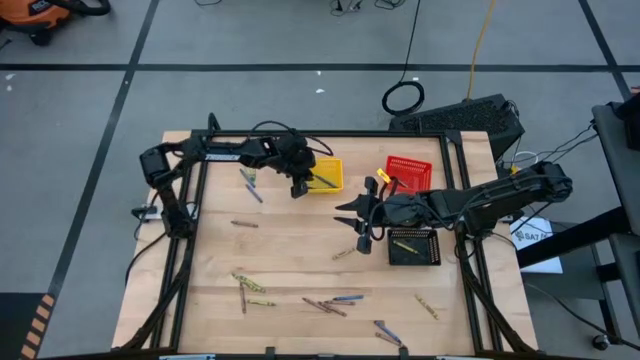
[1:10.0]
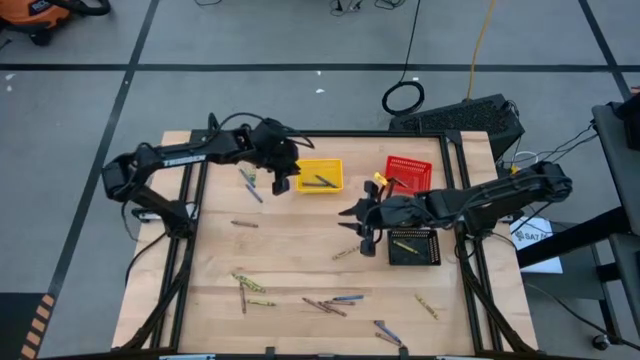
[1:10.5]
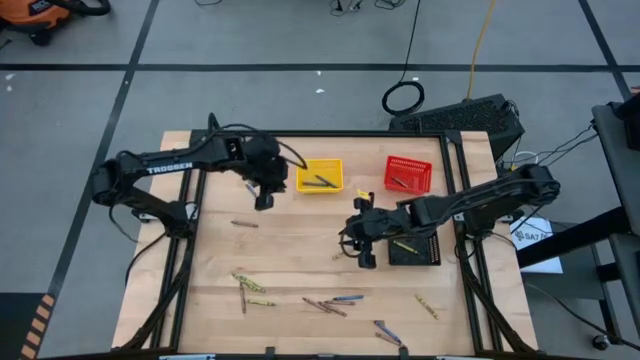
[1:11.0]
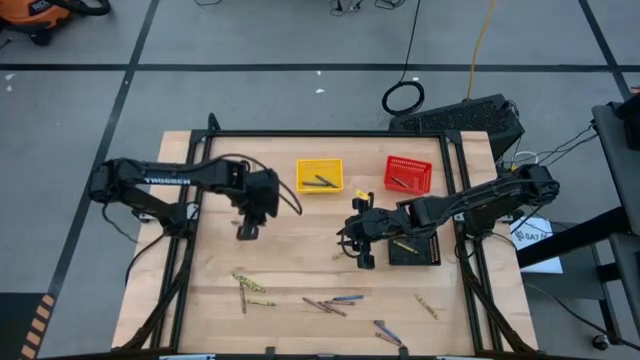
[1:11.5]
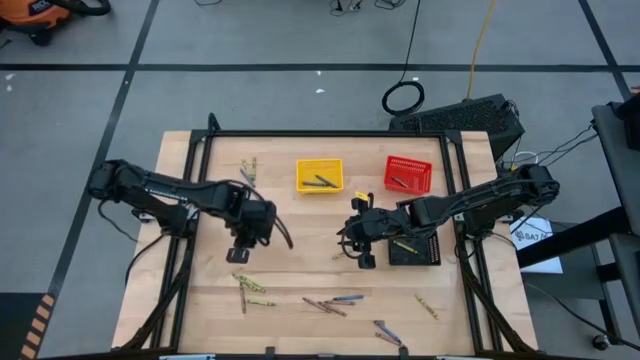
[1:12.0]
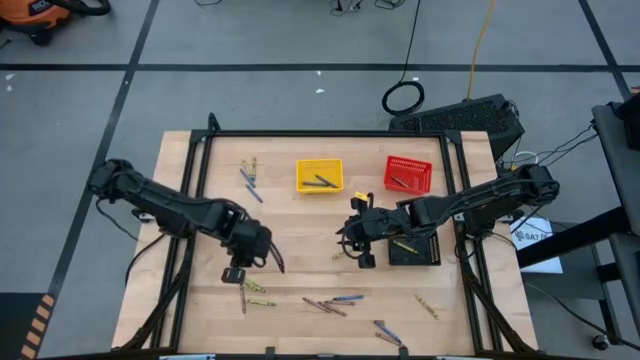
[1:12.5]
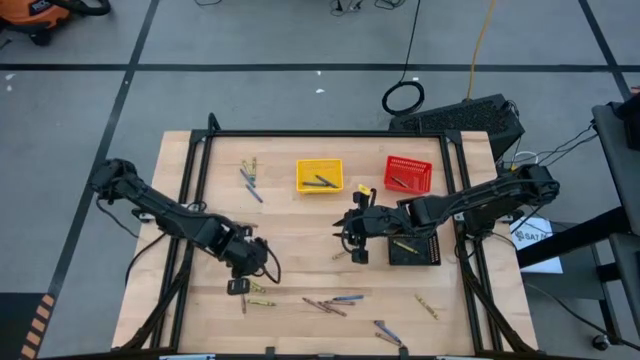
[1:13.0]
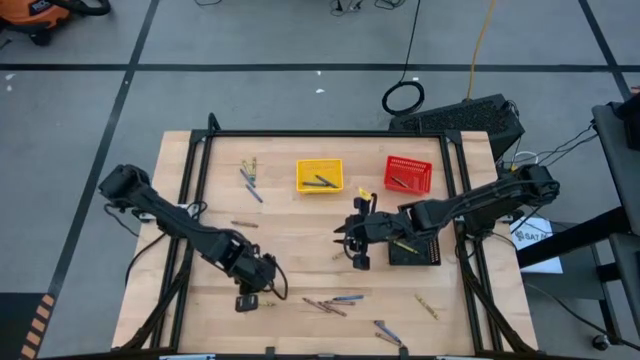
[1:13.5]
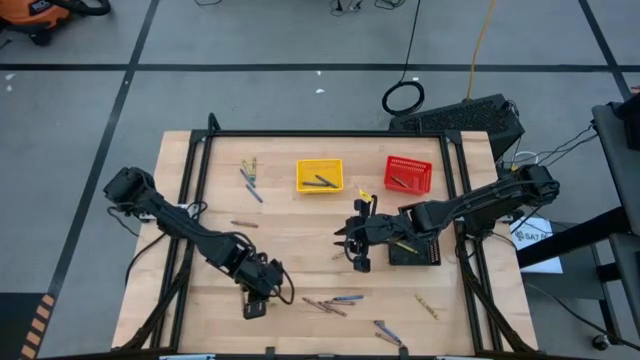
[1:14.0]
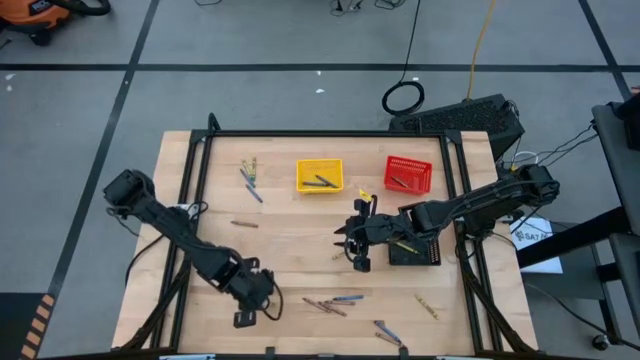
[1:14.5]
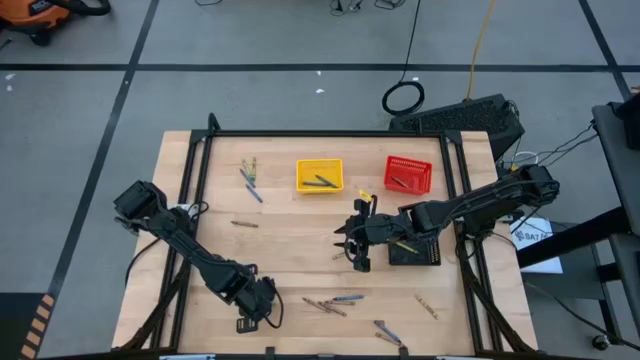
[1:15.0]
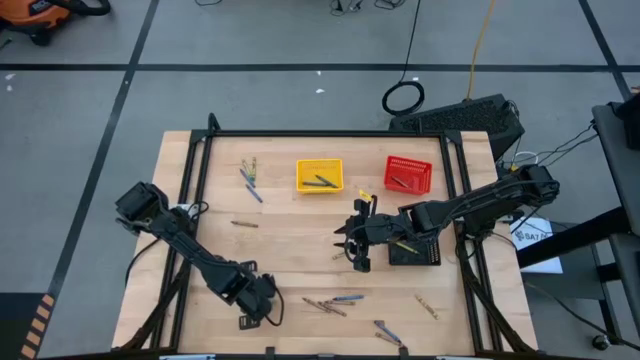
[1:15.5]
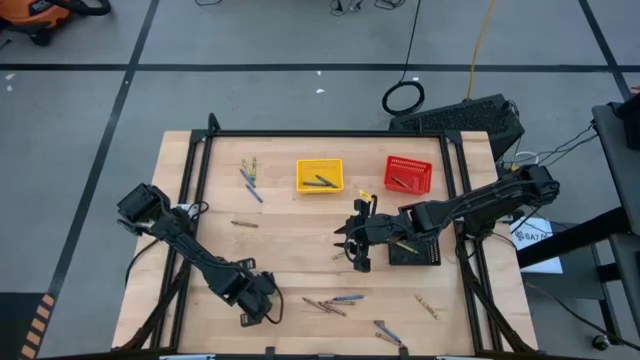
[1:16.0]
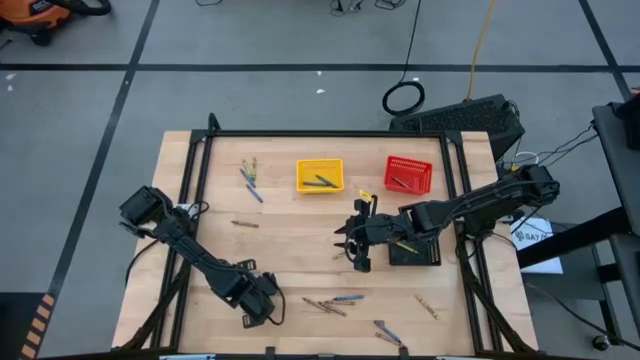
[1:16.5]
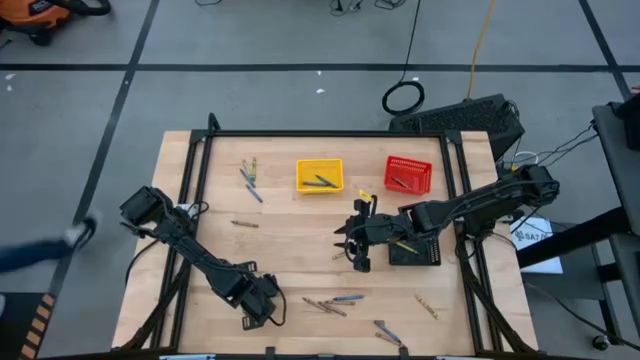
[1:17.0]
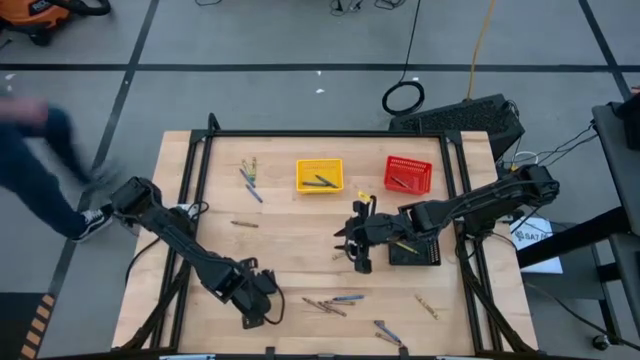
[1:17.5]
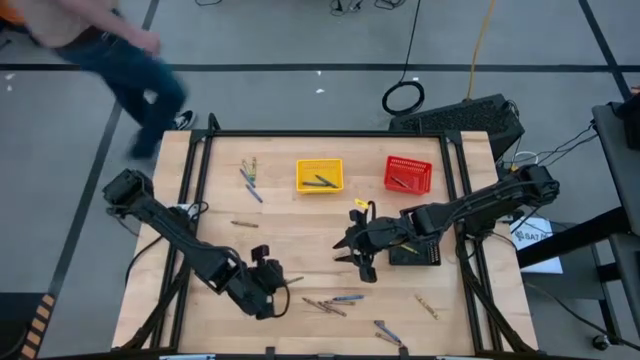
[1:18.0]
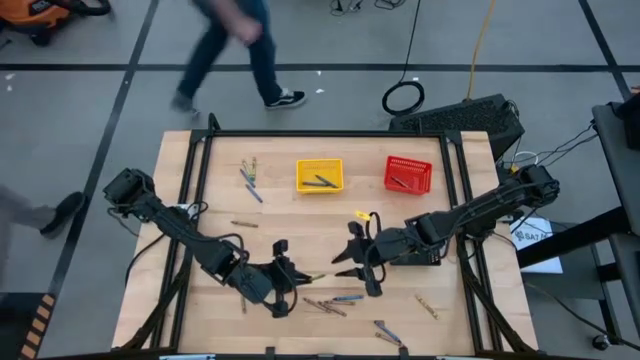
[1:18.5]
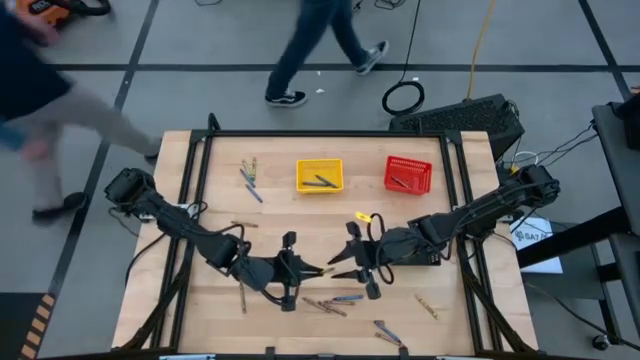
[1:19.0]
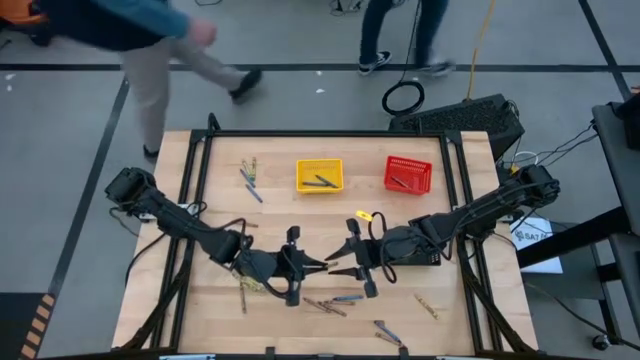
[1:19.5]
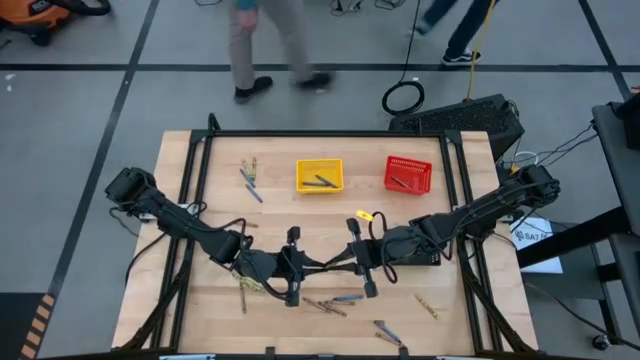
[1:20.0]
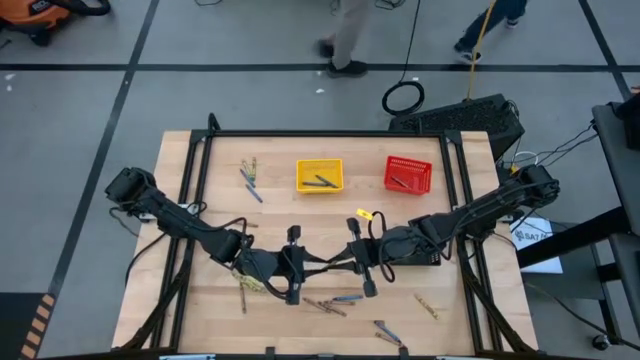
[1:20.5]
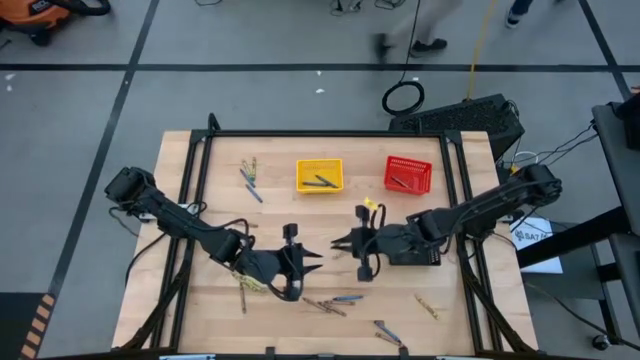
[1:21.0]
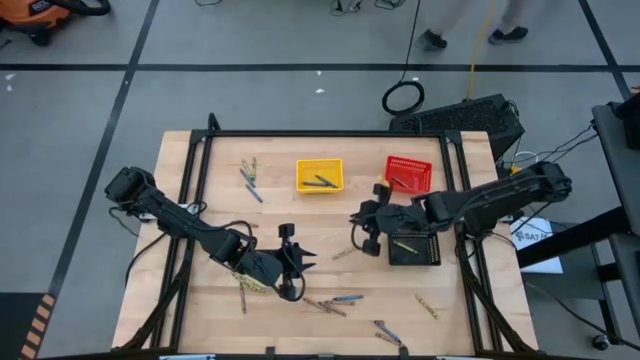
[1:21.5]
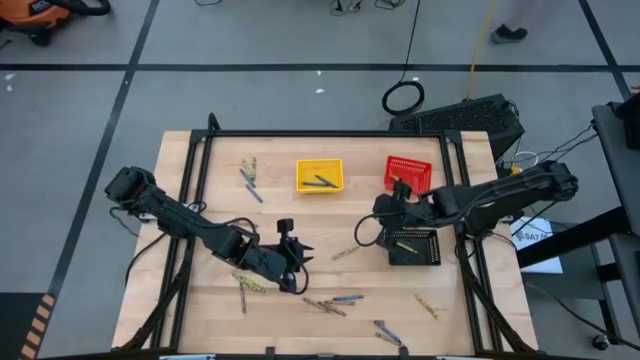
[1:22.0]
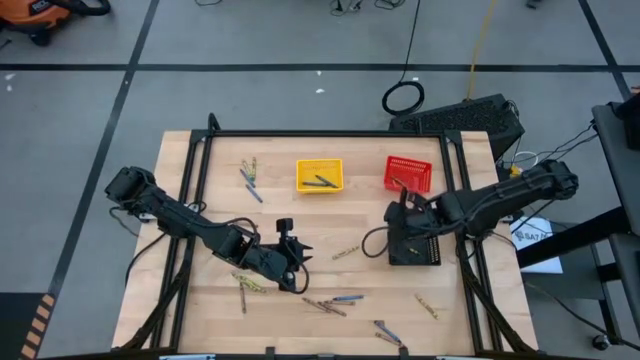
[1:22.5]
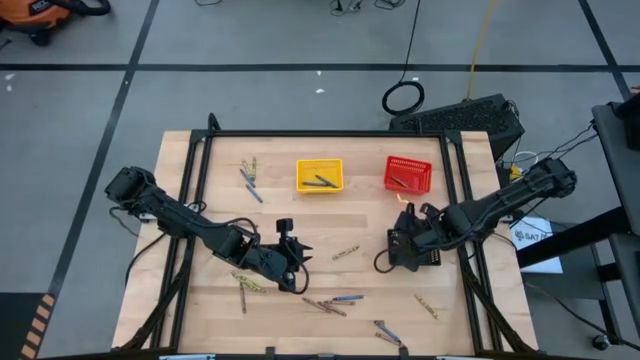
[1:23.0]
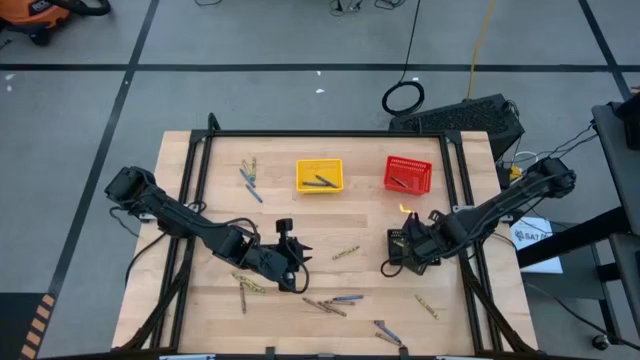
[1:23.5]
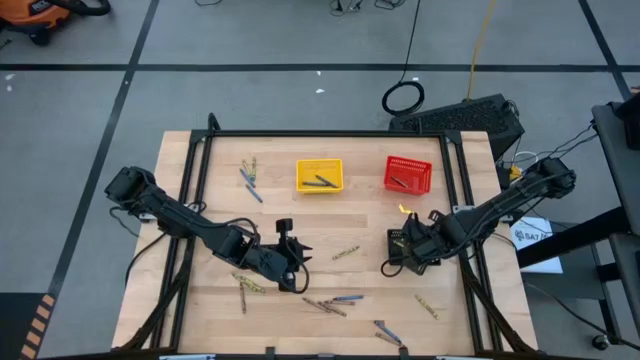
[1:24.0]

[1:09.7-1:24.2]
Task: Sort crayons
Put the green crayon into the black bin

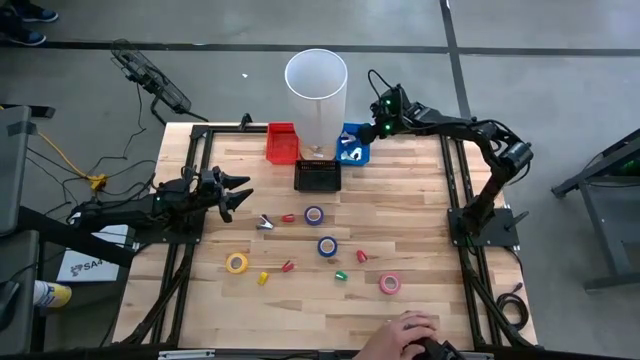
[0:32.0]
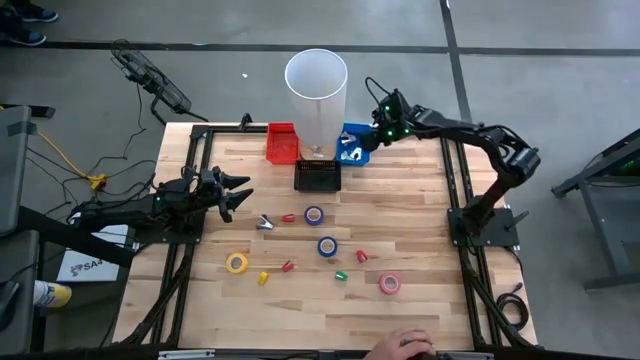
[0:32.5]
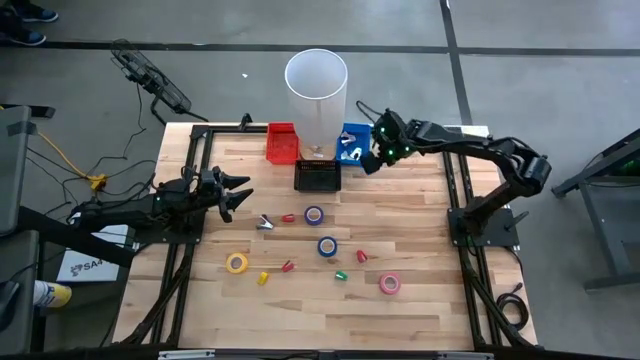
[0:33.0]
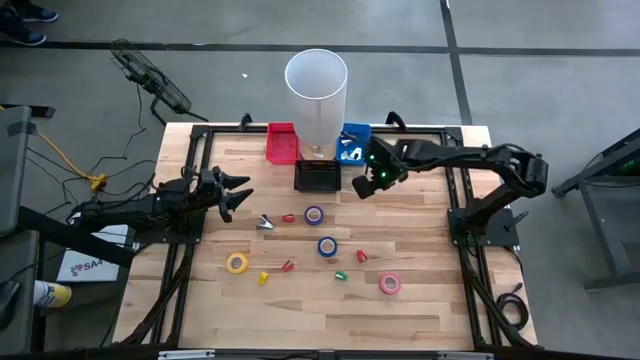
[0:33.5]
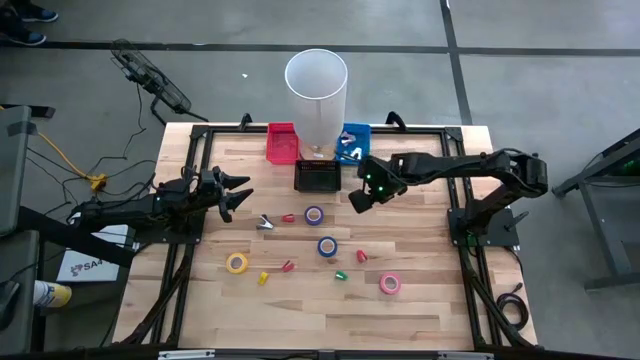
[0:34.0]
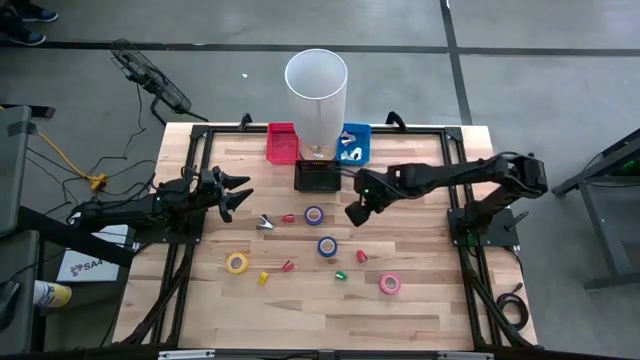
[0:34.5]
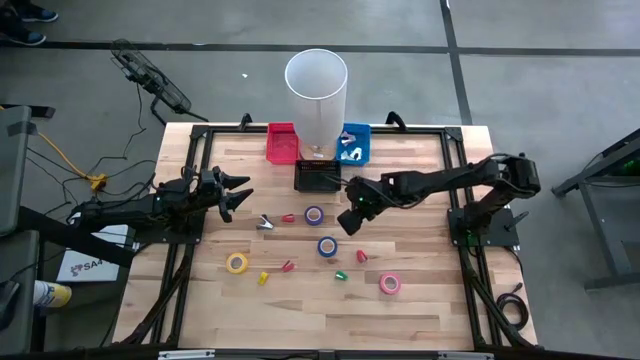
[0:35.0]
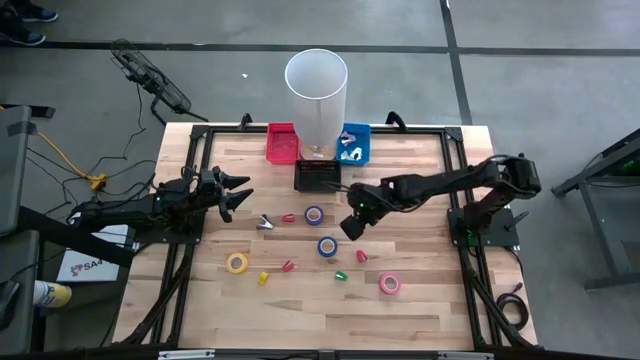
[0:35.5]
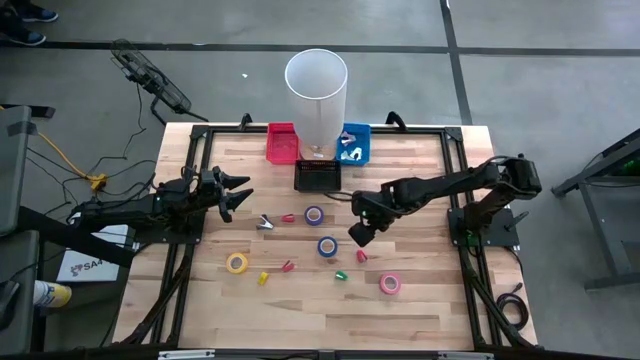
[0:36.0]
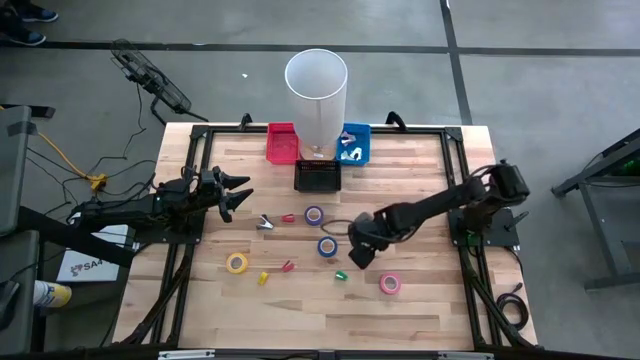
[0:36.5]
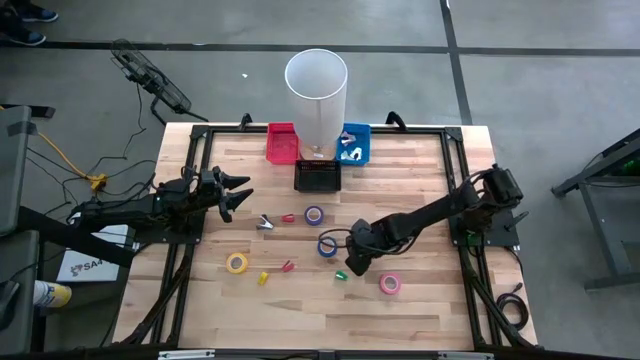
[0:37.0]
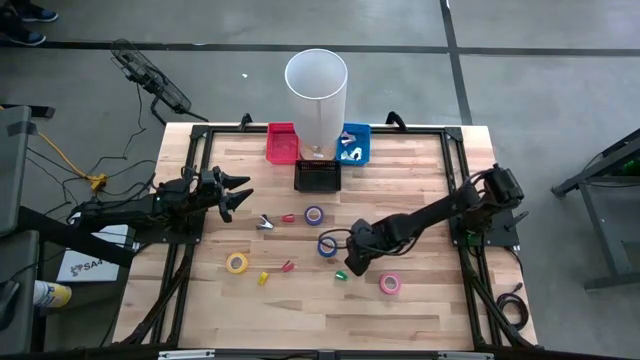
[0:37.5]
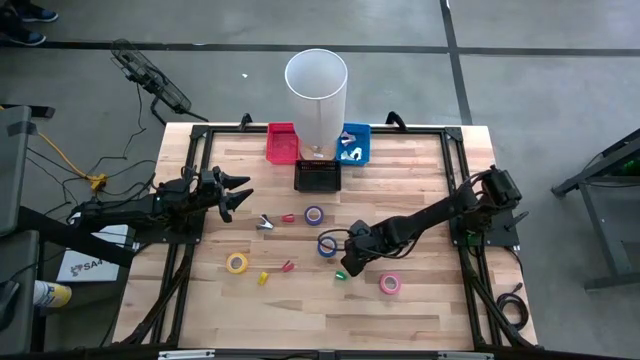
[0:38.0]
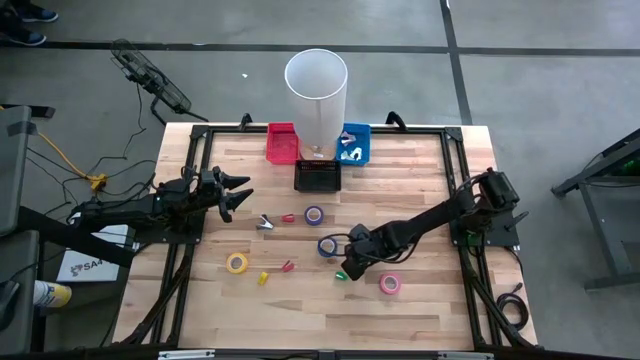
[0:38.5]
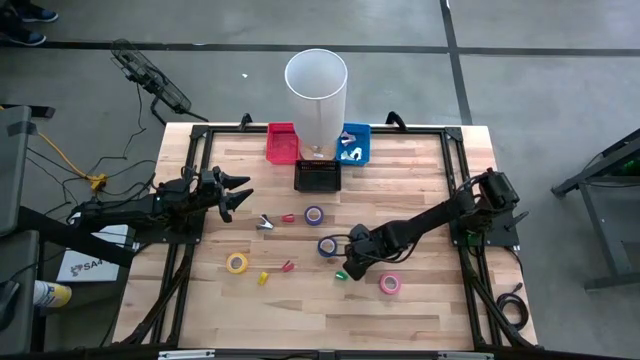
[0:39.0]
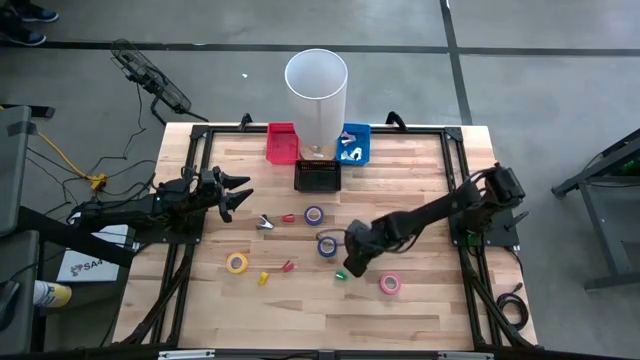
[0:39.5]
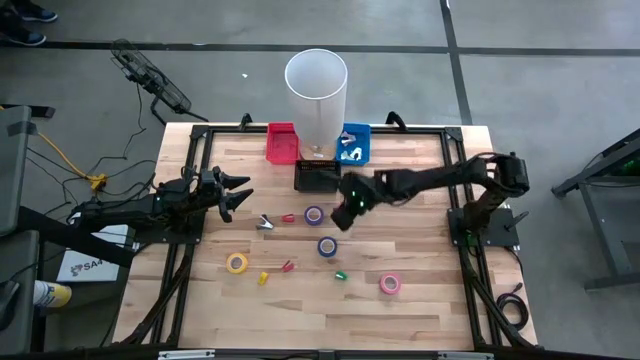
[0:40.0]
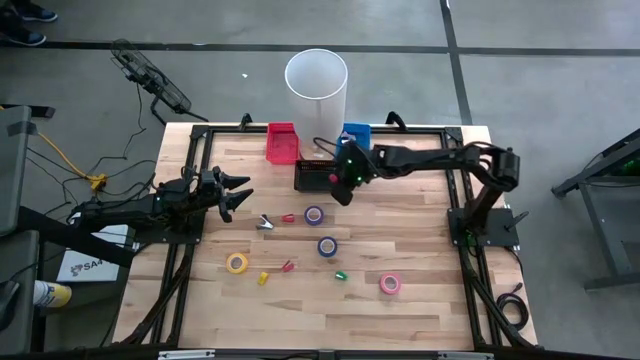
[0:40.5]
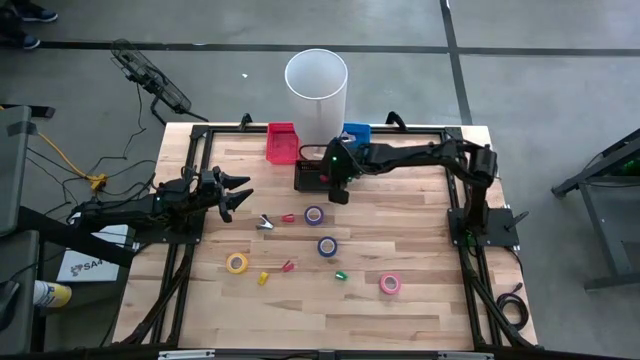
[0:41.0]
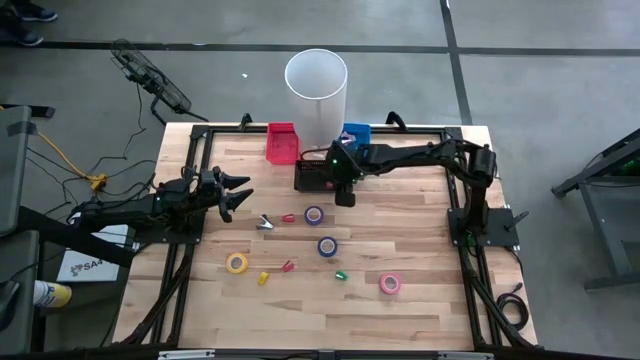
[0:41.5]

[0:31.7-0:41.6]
Task: Pick and place Stapler, Stapler remover, tape
Put the red mini stapler into the black bin
